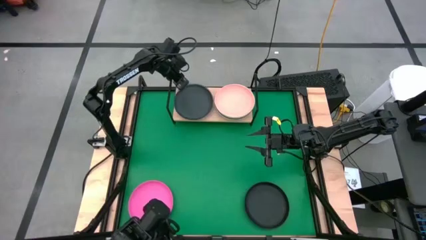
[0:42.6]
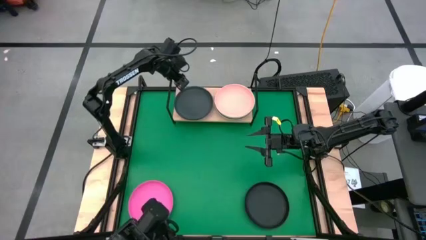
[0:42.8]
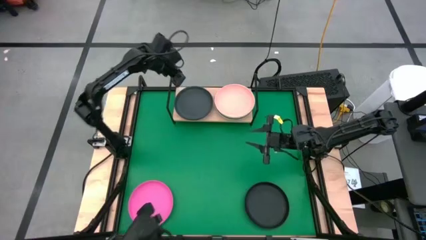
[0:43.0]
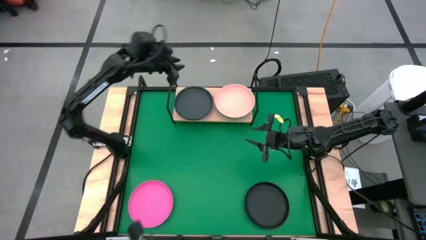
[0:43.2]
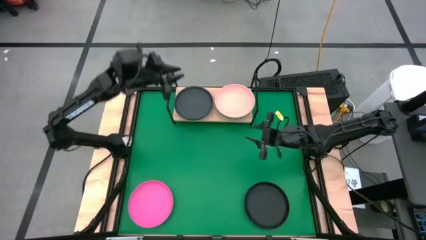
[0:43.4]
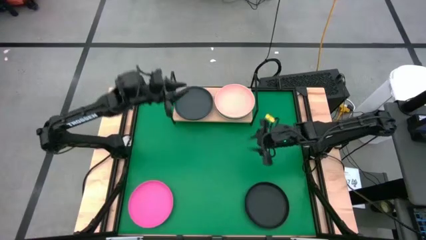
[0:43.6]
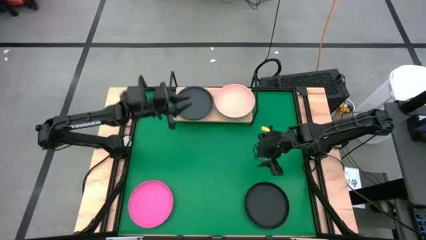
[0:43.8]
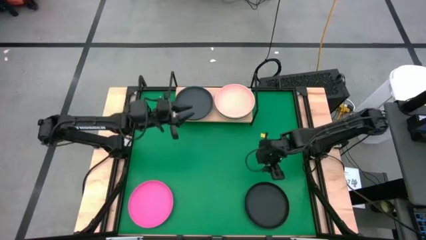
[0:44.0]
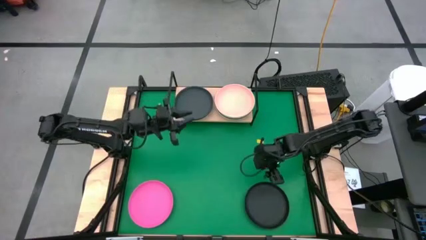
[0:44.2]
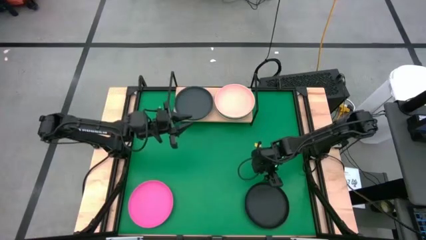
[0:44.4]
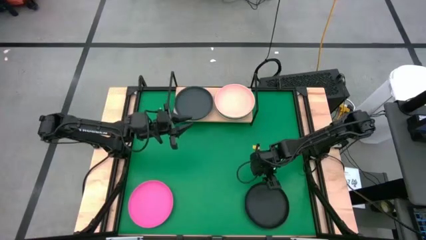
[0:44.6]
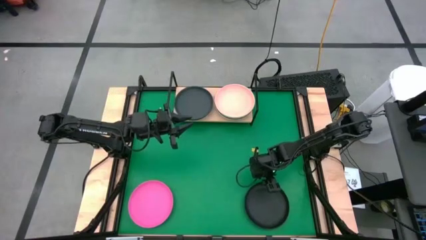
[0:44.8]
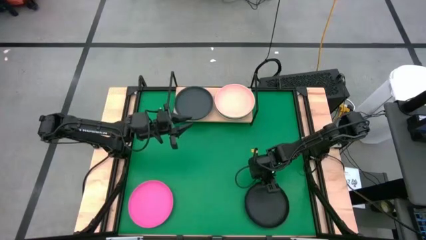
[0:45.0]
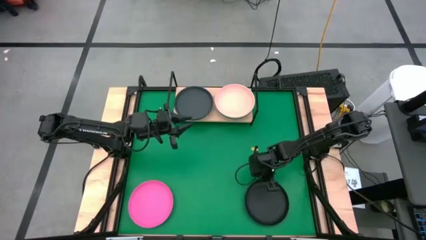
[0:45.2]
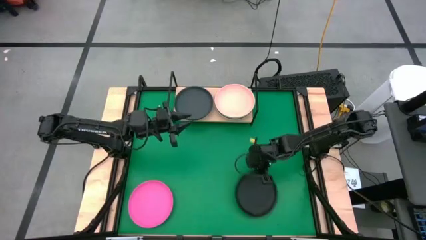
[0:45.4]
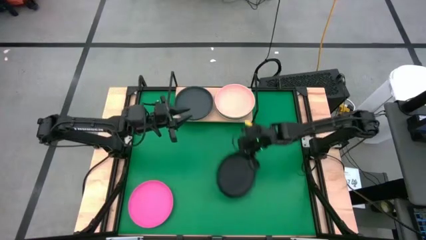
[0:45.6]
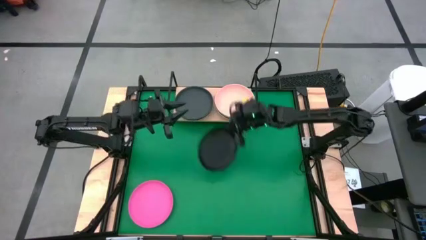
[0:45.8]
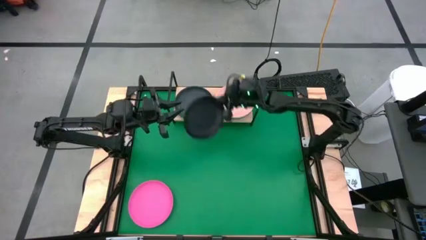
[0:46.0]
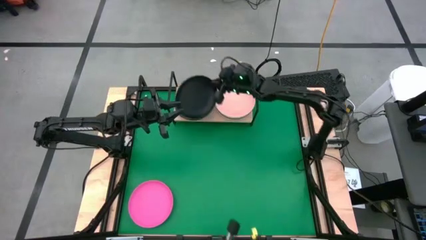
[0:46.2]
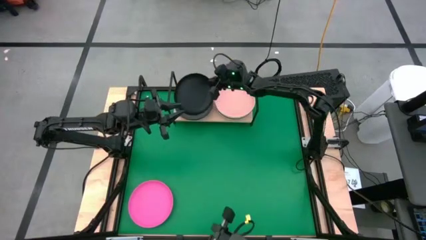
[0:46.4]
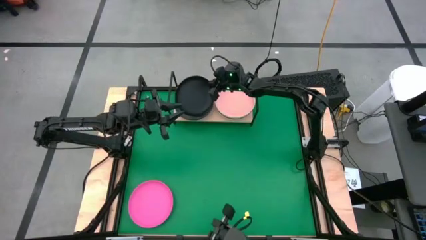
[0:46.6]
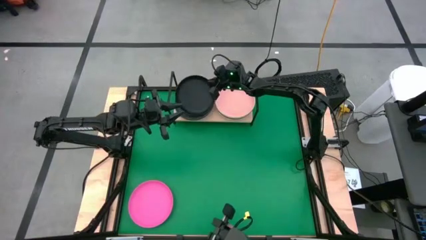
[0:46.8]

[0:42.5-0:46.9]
Task: Place and stack plates onto a shelf
Stack the black plate on top of the black plate on the shelf

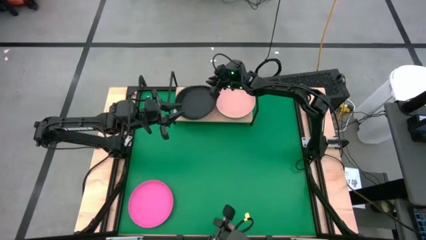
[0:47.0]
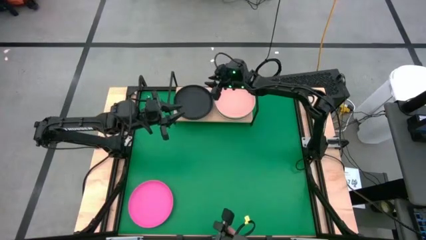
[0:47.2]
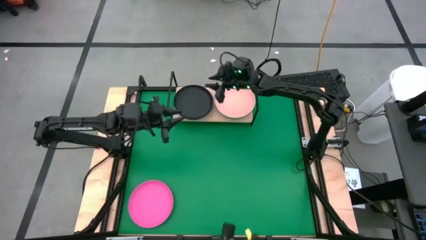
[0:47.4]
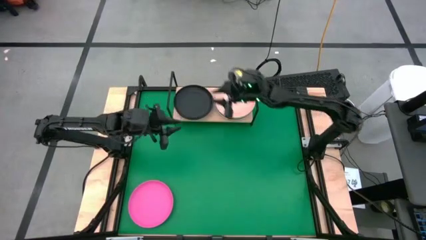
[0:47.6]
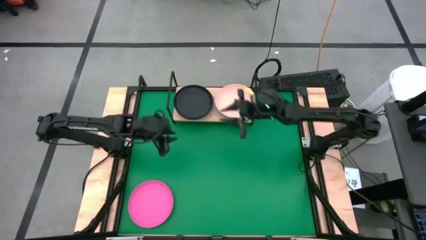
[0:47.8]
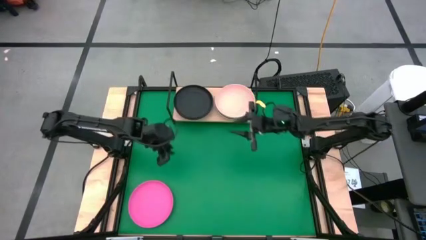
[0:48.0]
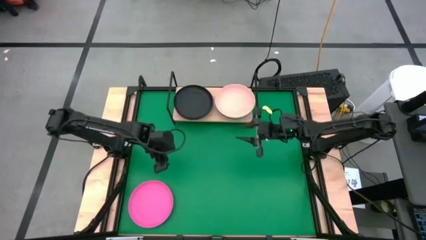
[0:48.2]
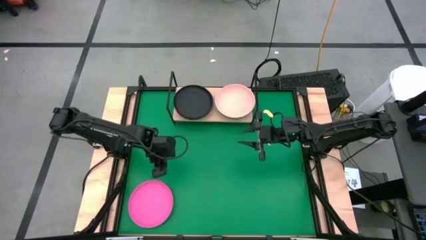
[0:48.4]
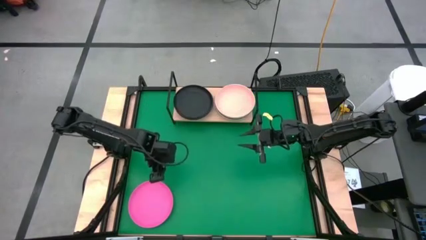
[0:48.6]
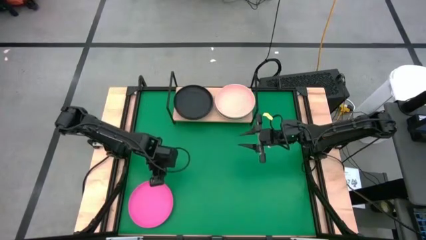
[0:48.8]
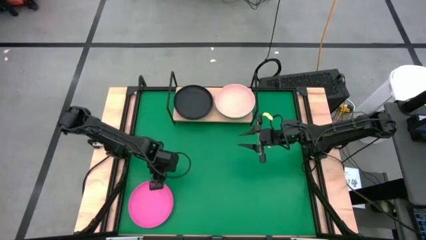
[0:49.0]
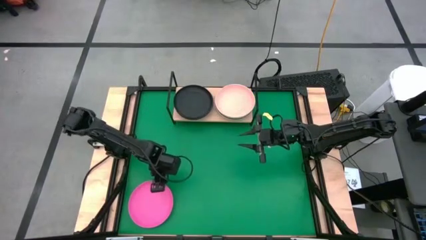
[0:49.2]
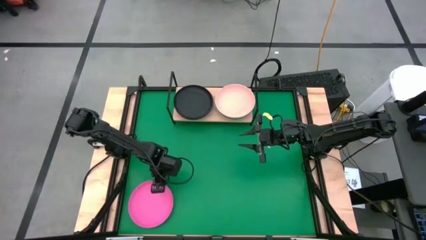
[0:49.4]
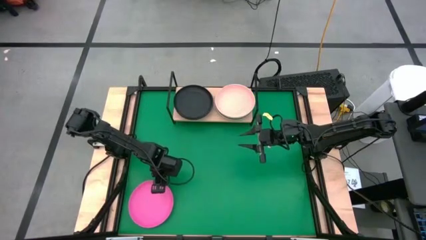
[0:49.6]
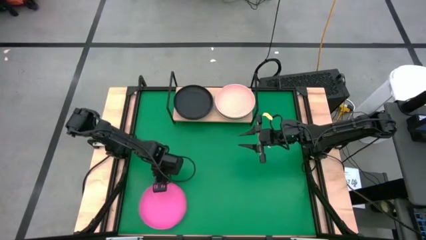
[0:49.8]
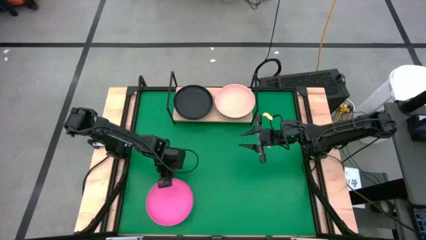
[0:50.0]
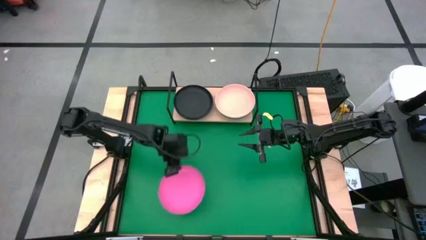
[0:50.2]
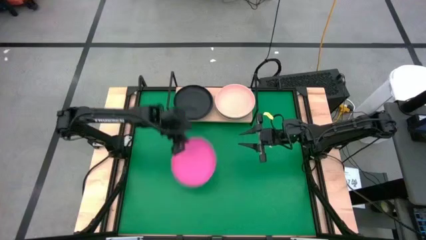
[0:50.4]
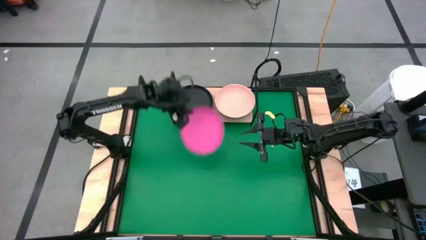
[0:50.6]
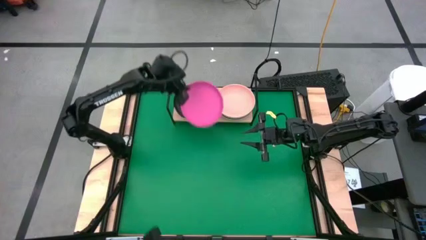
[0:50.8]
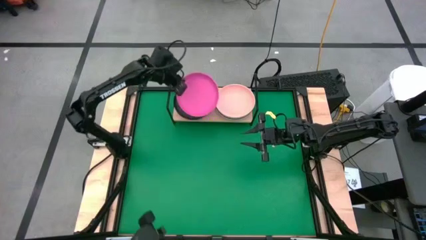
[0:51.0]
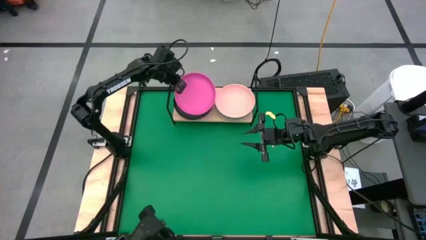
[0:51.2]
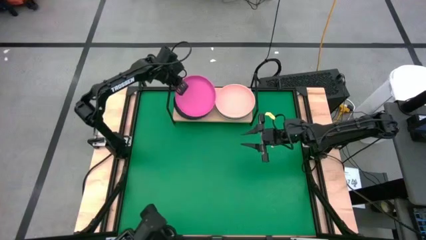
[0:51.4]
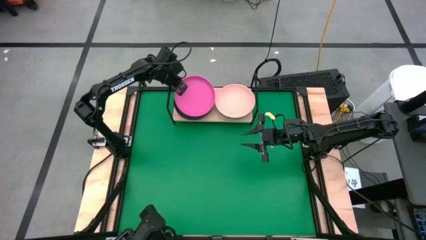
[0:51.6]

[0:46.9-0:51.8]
Stack the pink plate on top of the black plate on the shelf

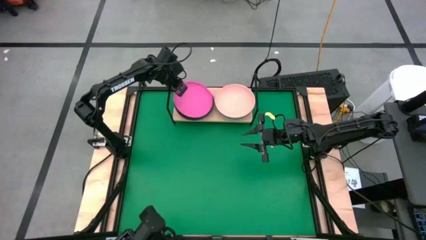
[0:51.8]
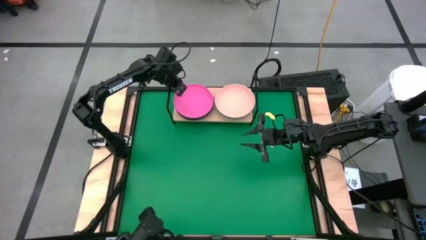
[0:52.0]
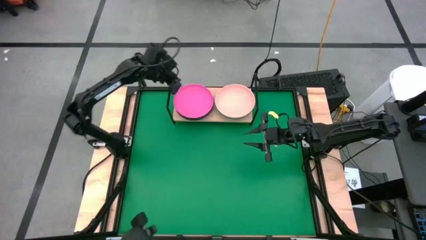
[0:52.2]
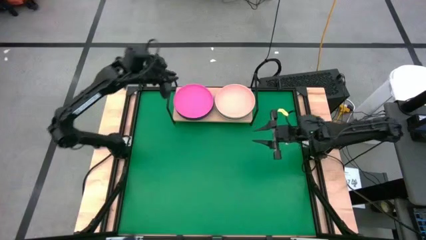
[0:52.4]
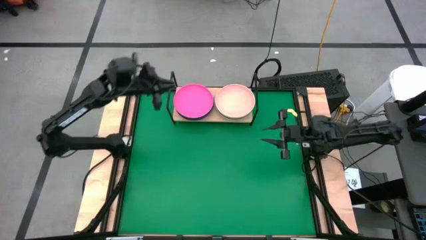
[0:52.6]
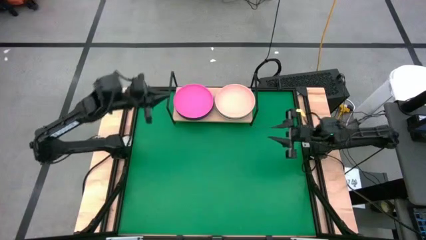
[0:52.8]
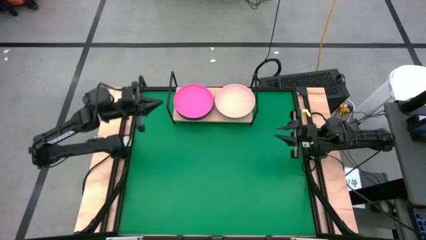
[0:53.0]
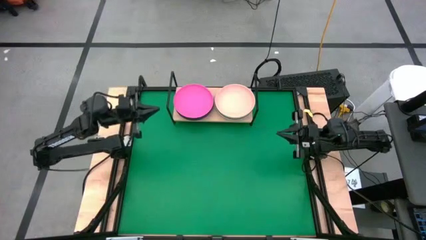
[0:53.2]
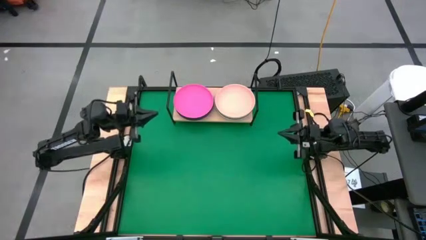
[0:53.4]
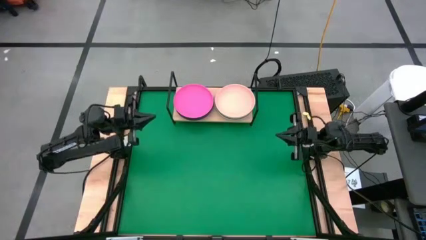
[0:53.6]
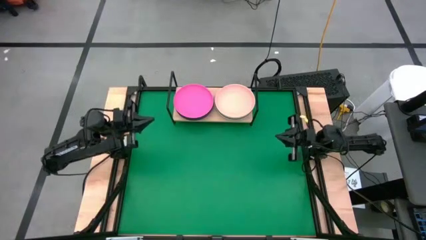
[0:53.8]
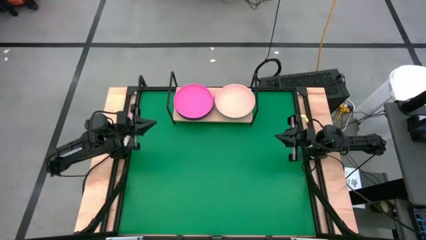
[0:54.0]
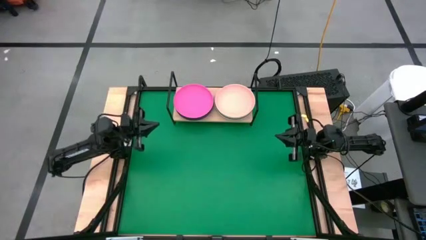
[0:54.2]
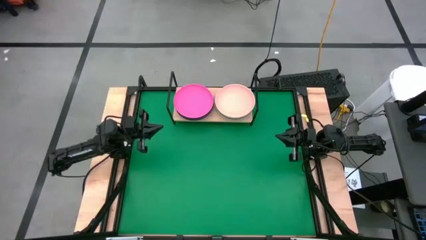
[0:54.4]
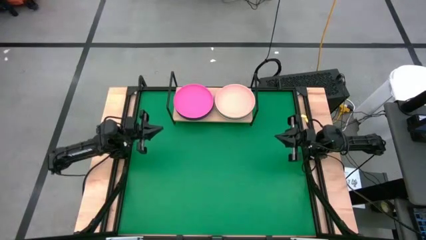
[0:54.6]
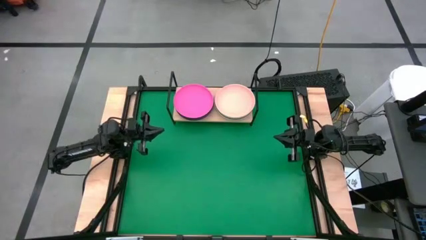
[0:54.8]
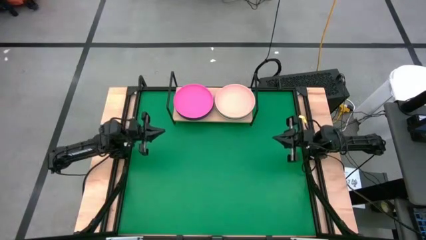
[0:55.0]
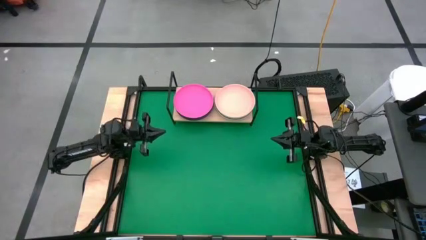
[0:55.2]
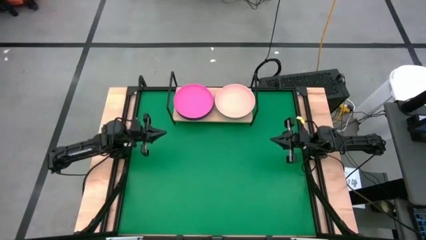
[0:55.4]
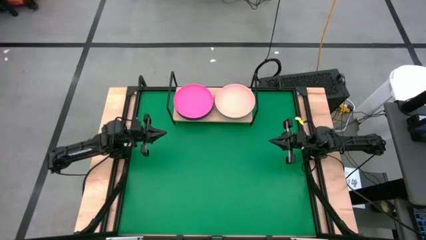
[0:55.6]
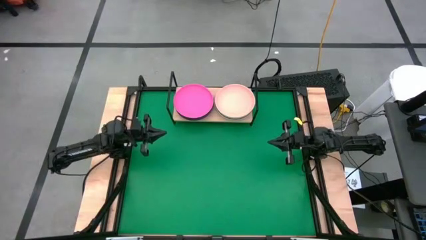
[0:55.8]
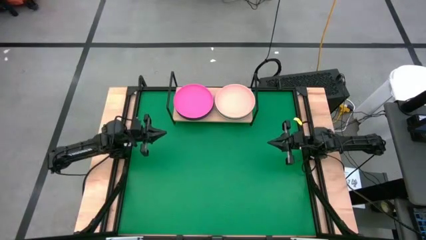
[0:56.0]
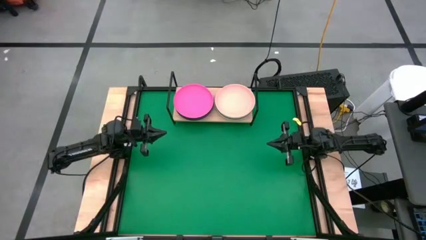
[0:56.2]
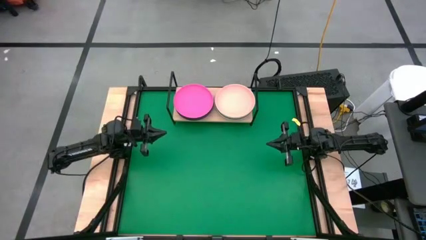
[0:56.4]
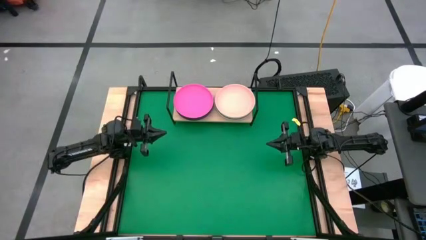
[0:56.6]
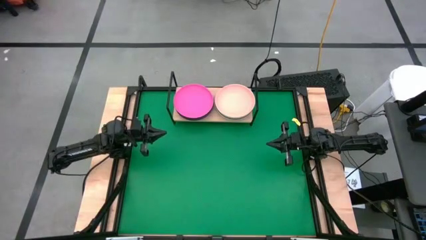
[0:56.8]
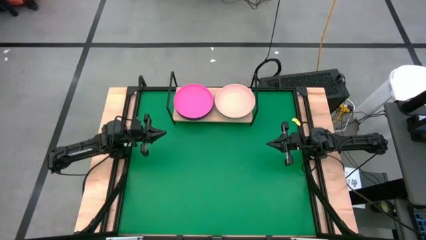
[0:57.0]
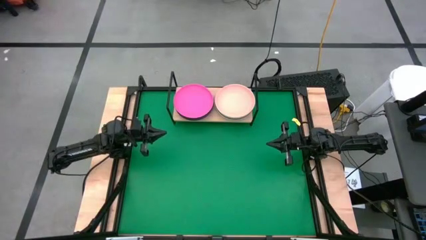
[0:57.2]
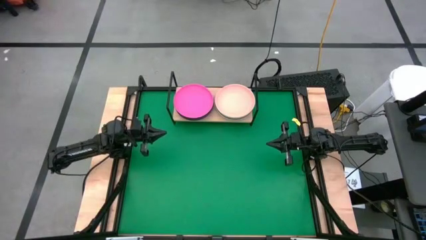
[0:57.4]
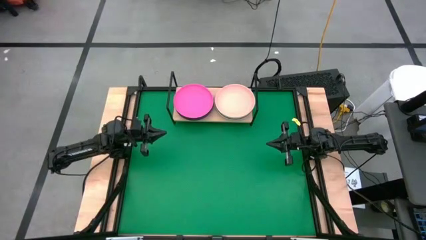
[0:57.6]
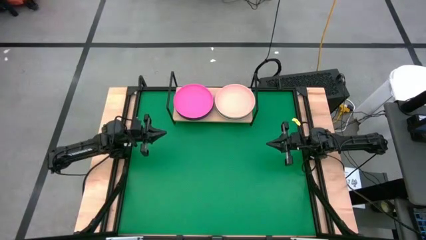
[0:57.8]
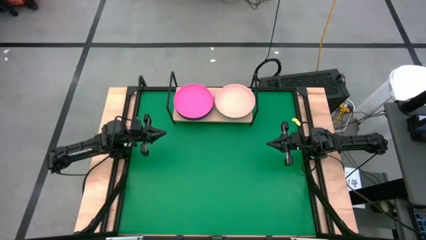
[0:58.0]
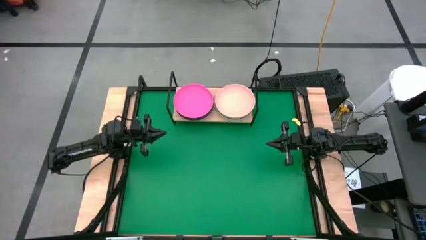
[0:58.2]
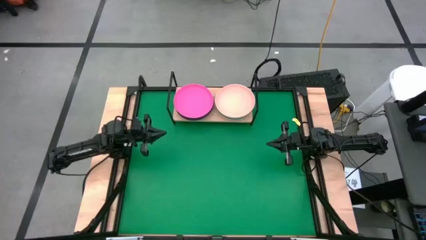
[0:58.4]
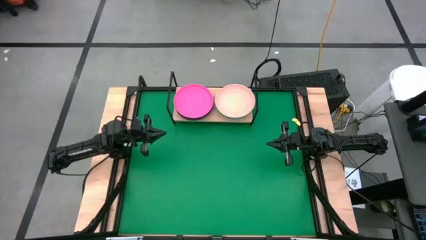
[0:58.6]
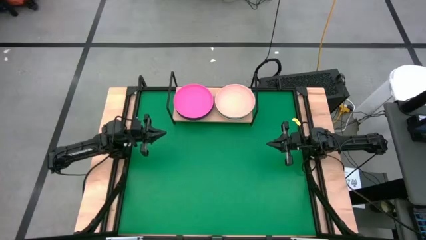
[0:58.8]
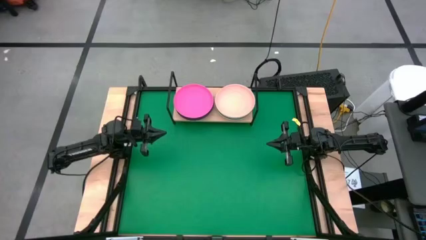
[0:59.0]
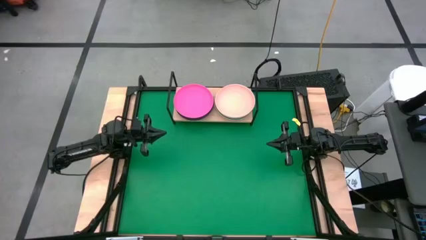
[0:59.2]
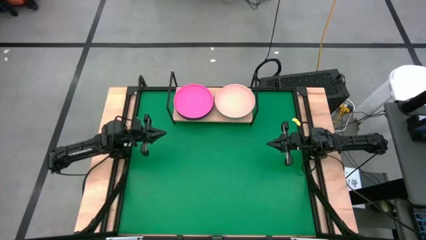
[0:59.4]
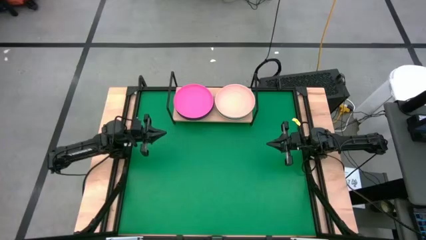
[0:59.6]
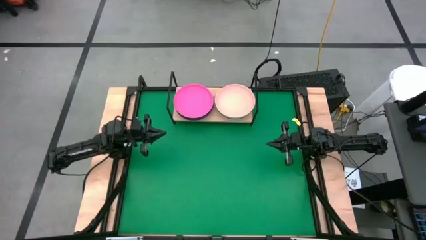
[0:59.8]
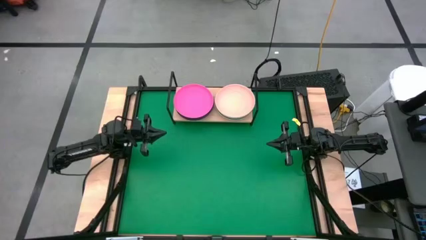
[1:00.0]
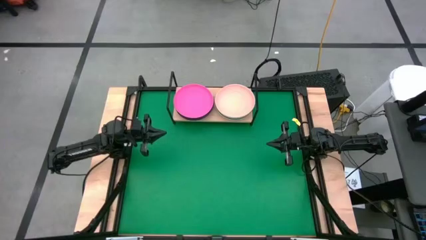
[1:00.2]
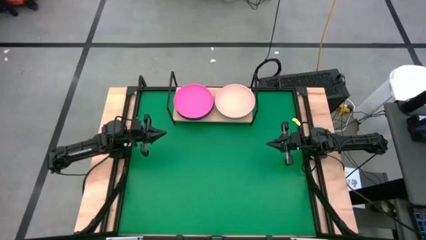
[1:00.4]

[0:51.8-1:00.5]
Return to Home Position
